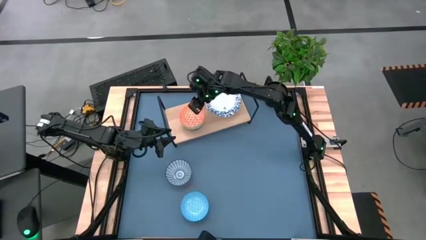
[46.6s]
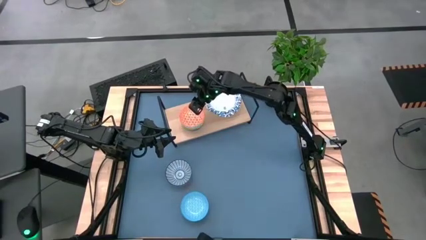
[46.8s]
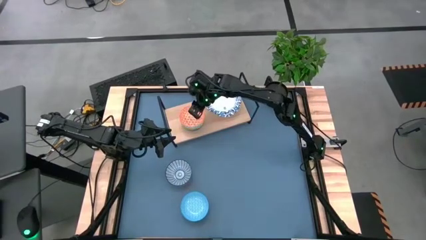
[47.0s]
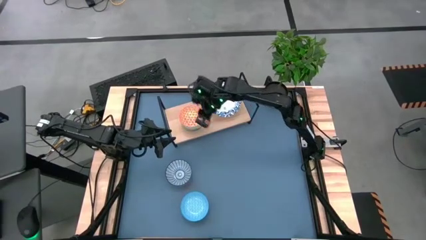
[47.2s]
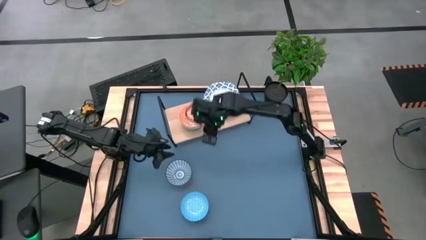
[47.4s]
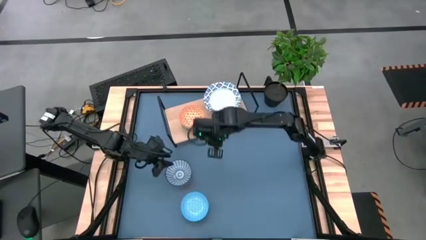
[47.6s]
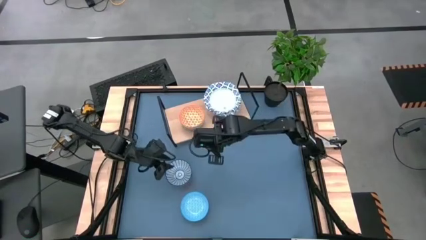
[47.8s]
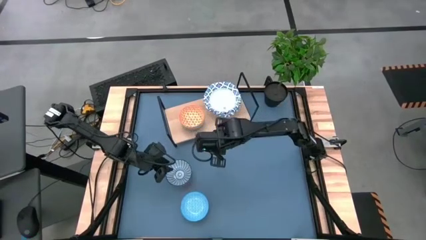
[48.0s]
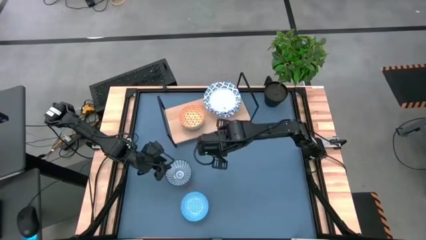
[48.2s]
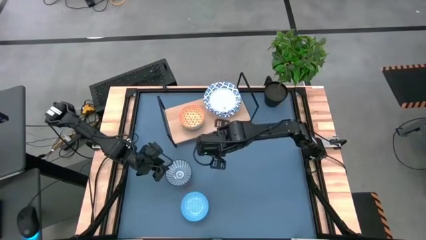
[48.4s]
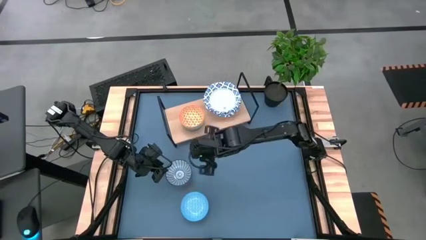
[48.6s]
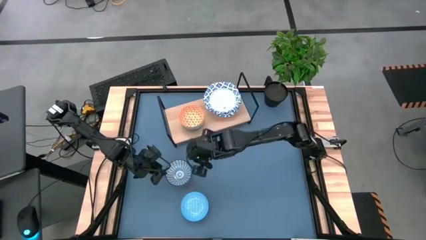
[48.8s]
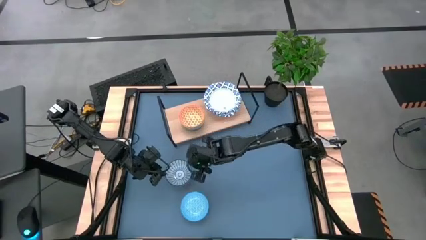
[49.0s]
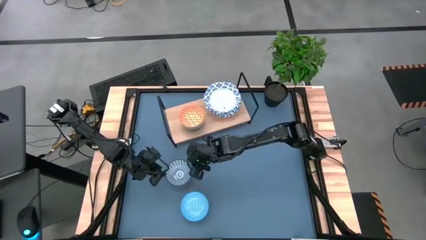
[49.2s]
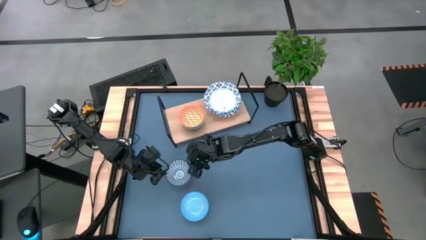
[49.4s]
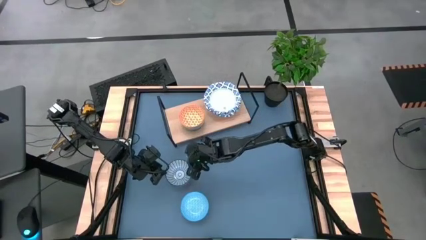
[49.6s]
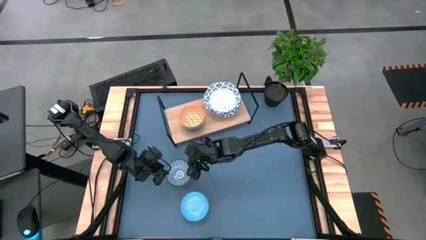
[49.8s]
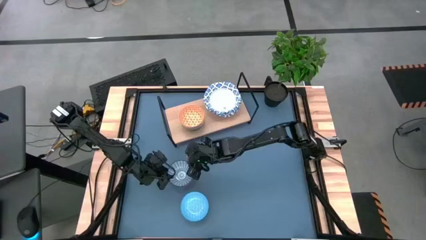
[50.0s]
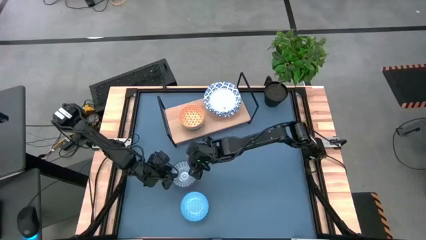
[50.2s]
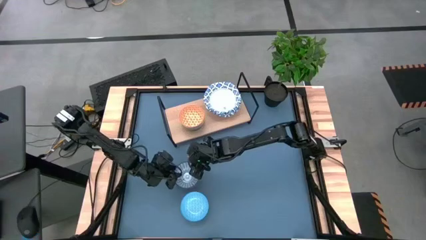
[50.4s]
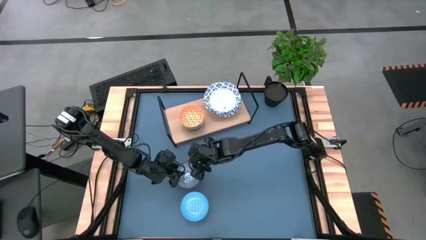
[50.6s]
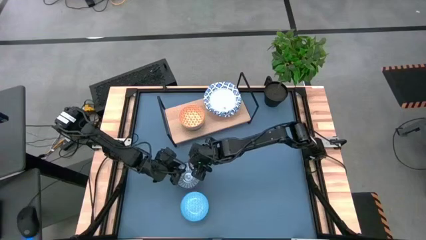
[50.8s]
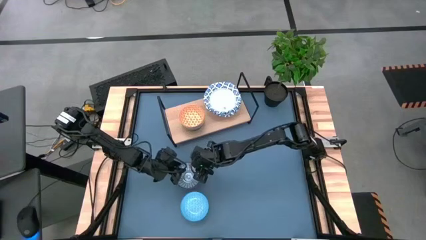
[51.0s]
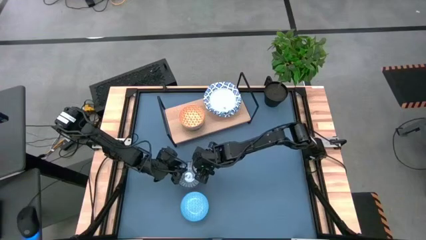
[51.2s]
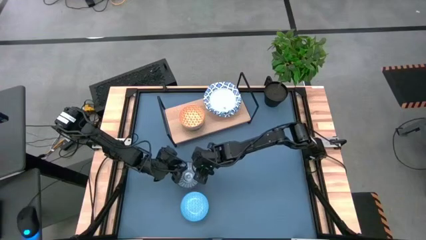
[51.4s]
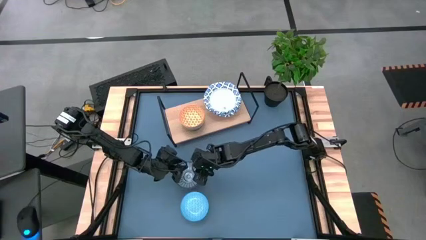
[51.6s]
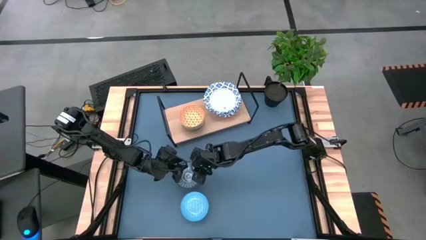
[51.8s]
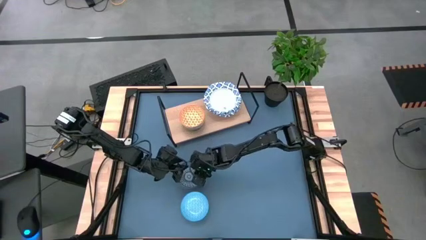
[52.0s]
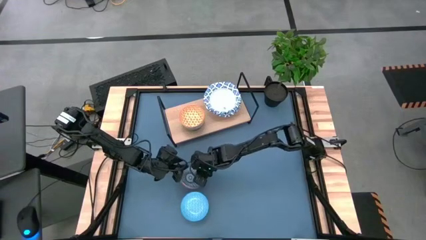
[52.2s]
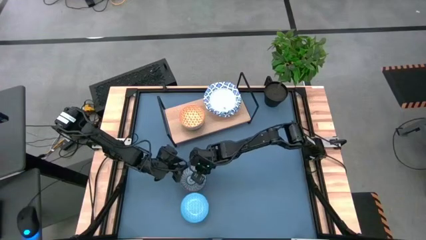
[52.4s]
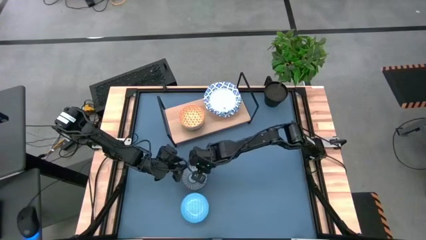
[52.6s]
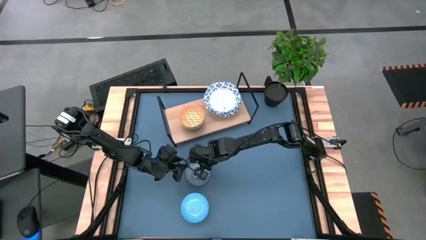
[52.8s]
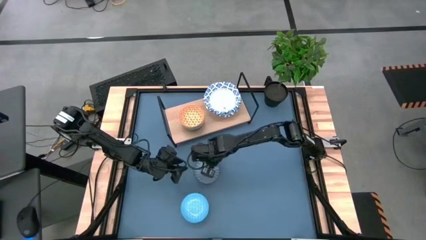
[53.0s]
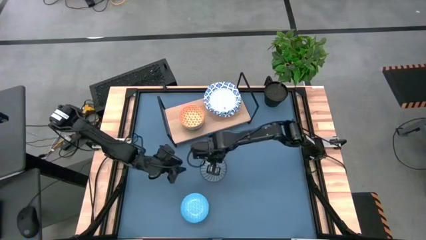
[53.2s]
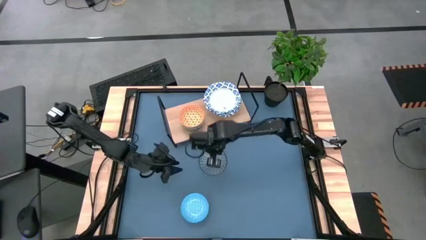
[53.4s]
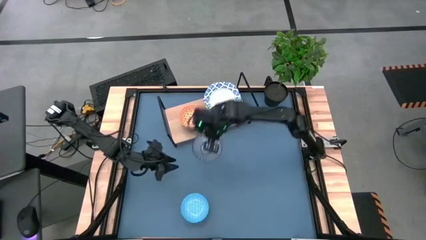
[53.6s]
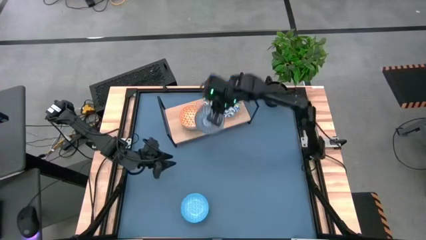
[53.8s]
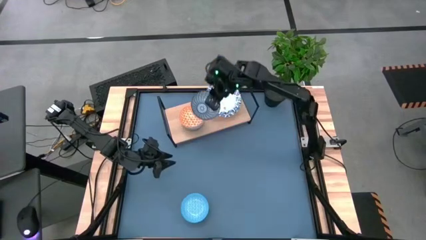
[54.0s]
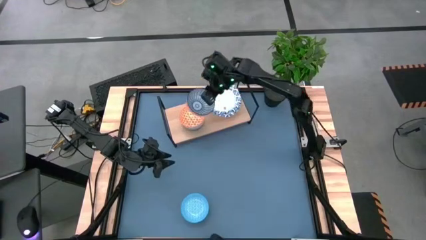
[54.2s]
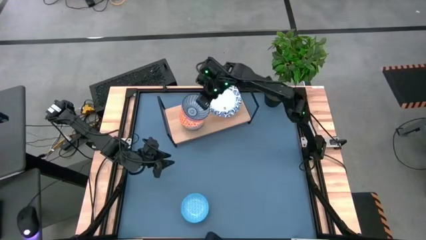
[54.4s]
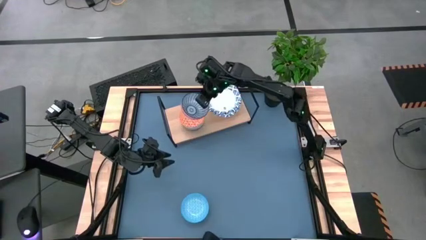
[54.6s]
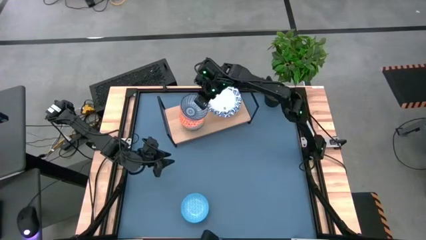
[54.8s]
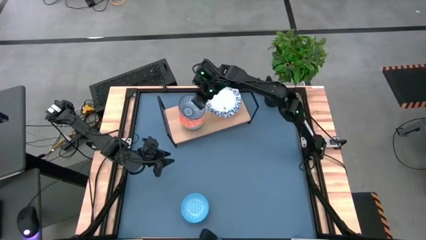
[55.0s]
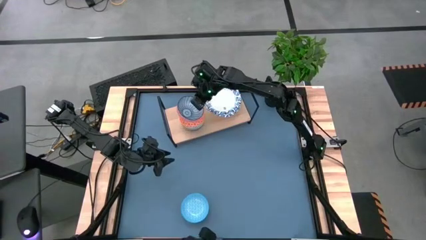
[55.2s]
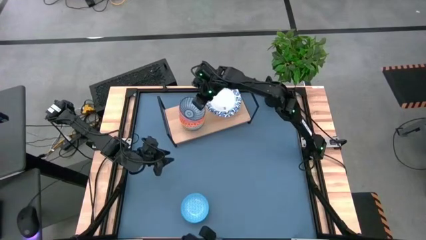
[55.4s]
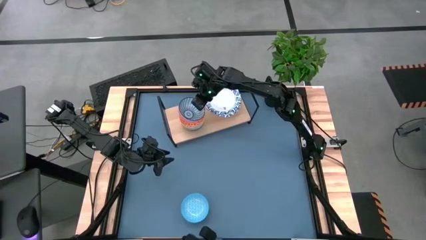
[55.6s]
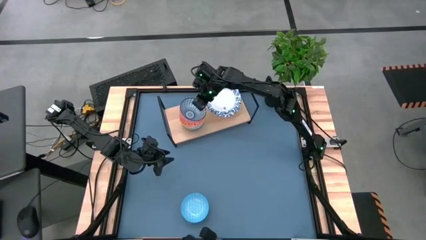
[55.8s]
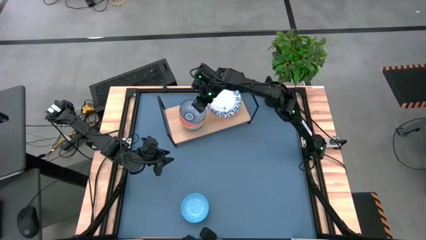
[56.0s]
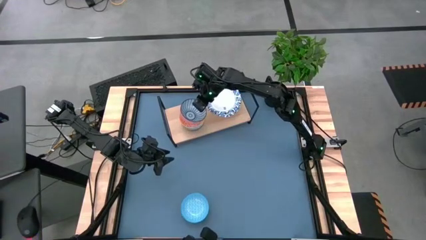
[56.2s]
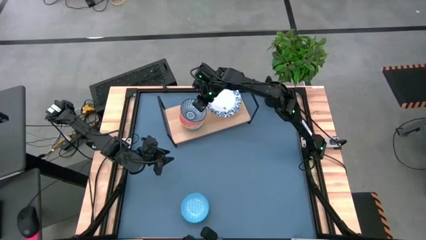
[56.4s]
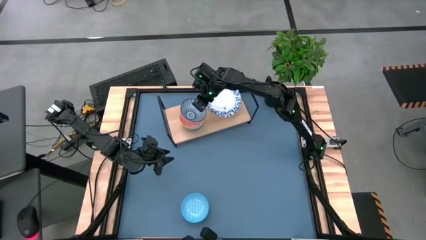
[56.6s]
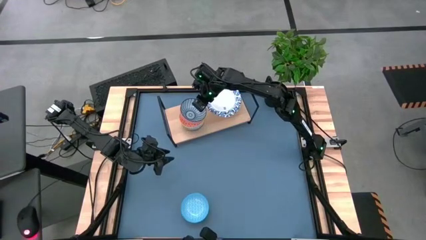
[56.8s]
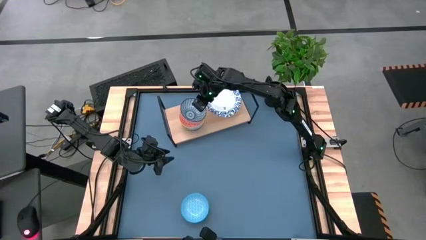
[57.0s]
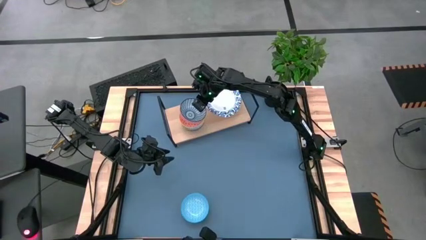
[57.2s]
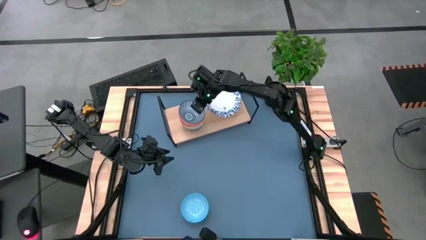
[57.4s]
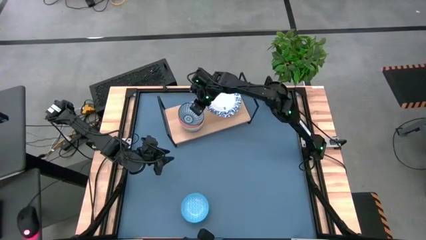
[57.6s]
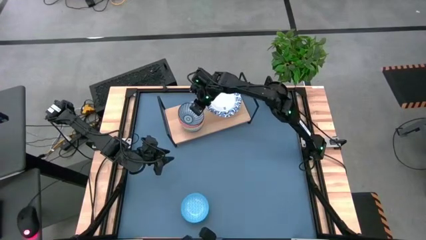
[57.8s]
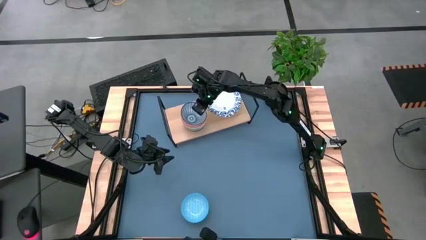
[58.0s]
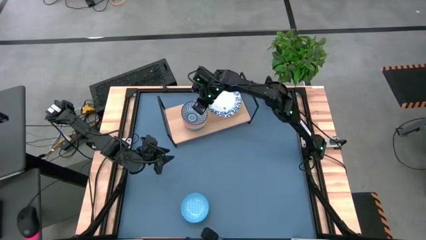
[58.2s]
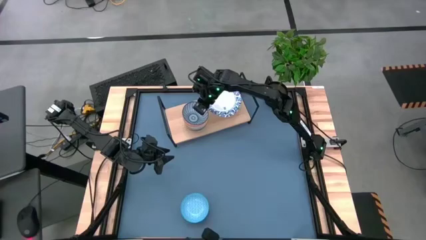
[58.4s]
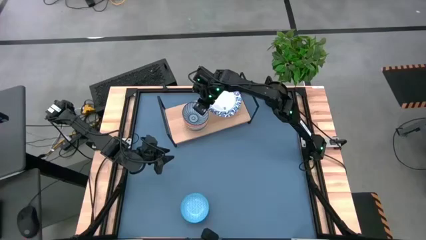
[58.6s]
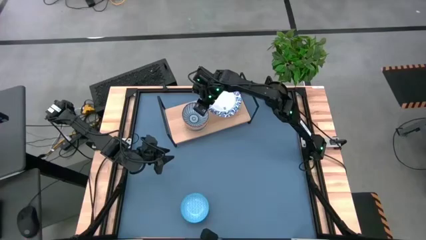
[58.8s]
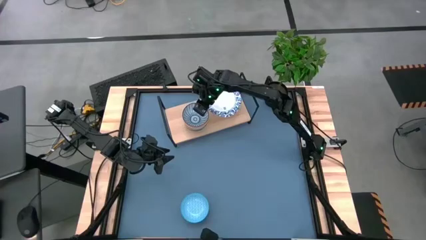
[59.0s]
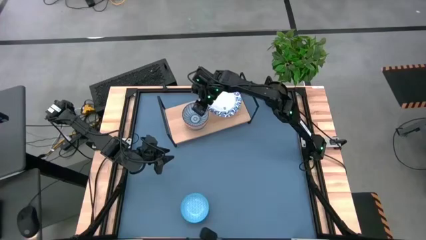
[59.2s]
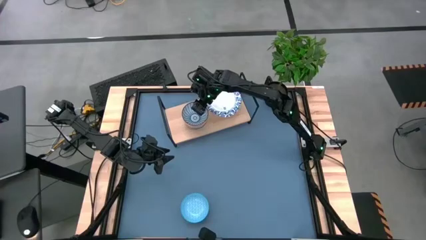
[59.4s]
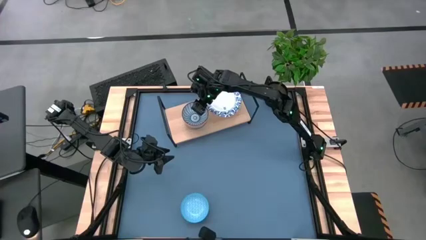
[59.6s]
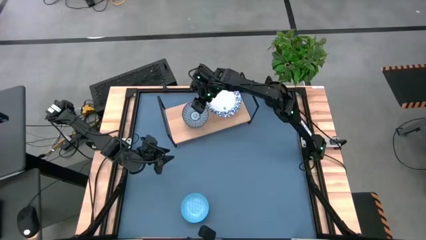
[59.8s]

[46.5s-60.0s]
Task: Place and stack bowls onto a shelf
Stack the dark blue patterned bowl on top of the orange patterned bowl on the shelf

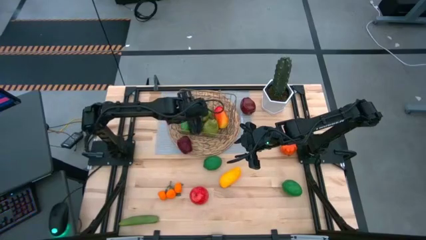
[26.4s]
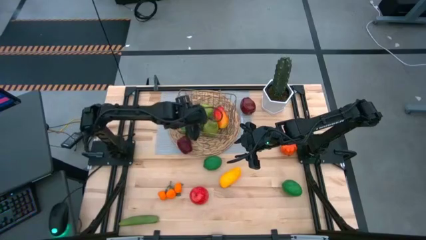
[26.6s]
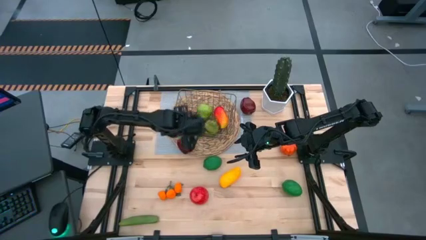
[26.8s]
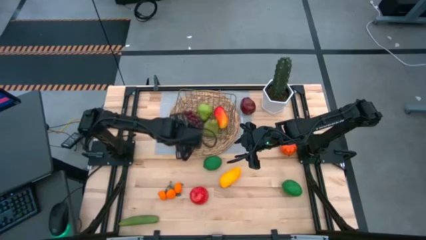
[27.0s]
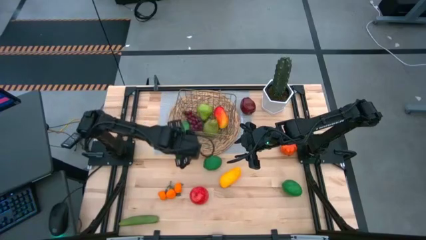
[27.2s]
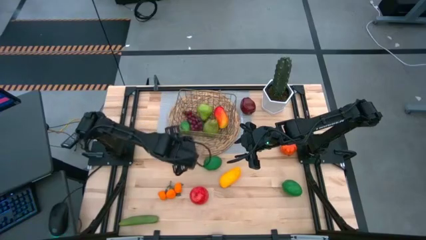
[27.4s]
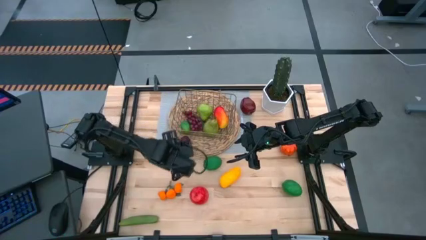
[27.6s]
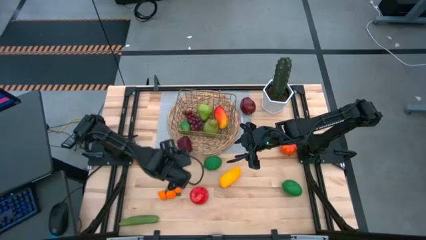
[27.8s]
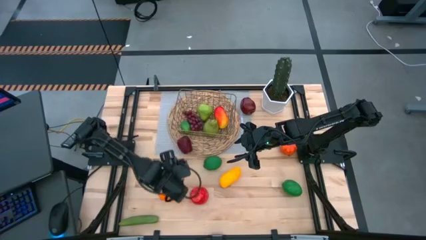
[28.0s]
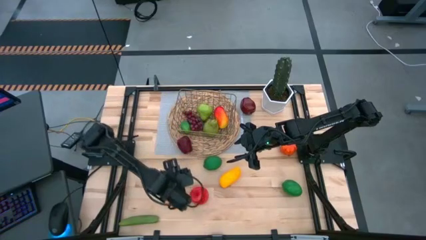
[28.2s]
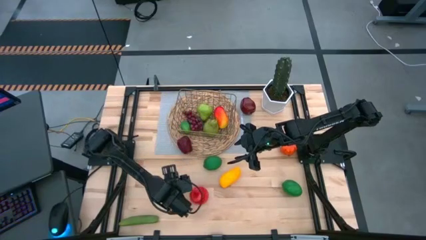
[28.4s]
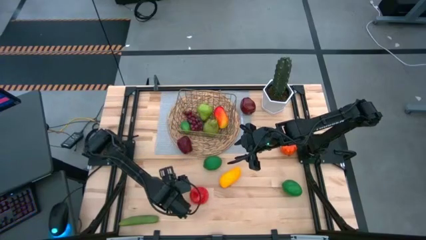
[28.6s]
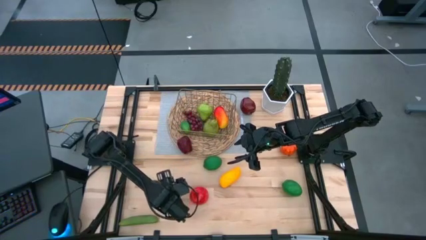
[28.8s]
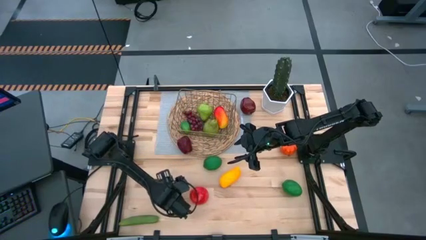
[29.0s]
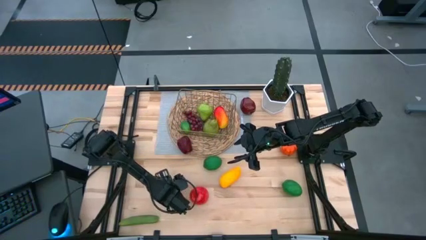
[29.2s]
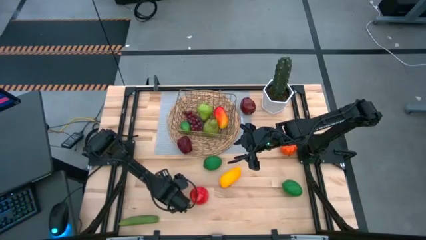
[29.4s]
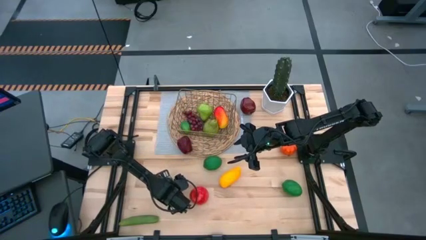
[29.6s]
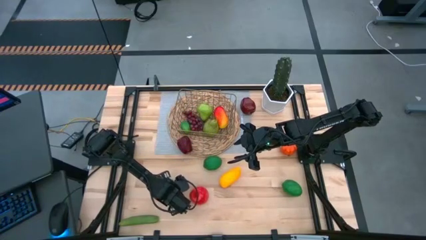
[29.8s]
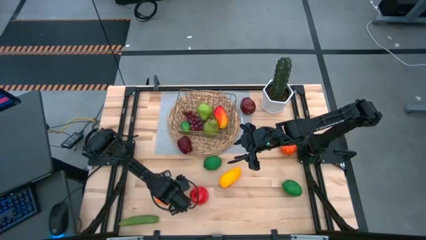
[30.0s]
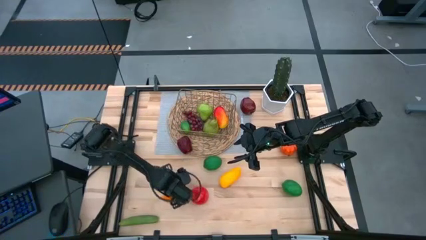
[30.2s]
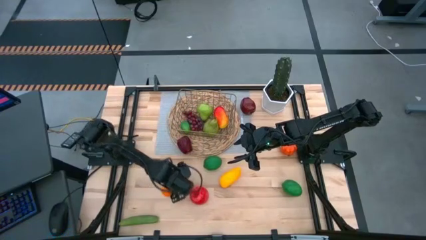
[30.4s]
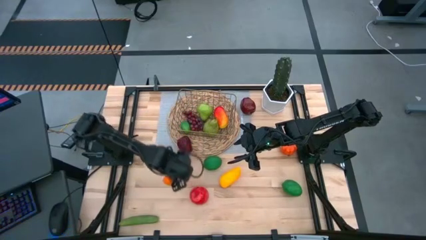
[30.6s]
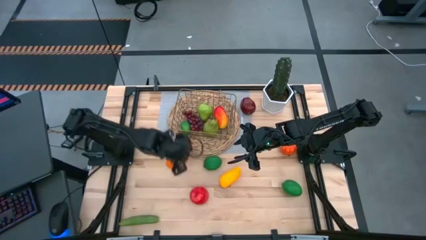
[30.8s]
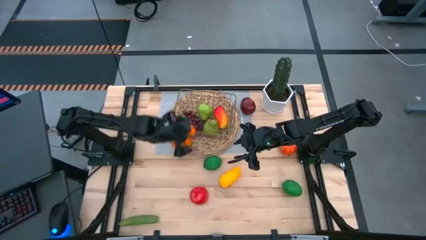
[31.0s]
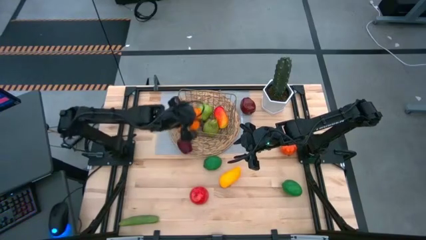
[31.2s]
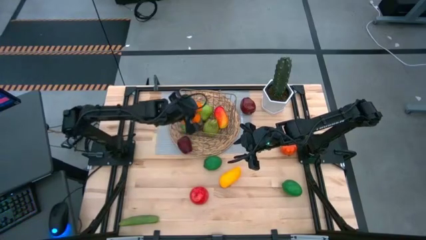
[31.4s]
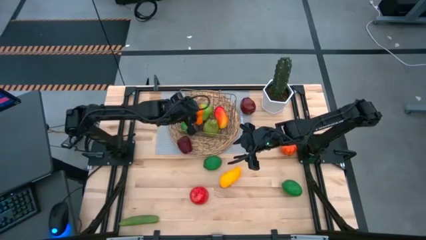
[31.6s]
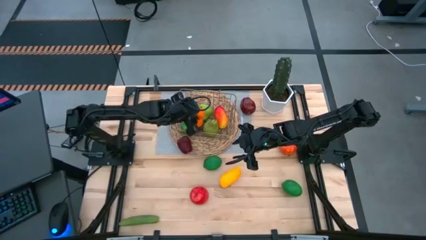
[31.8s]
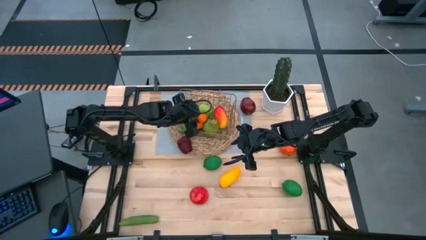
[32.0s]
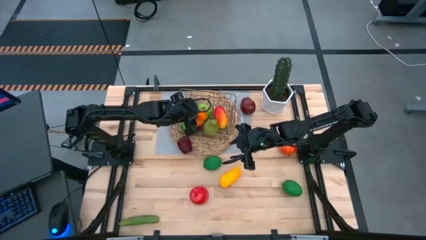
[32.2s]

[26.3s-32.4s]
Task: Build produce basket
Put the tangerines into the gold wire basket
